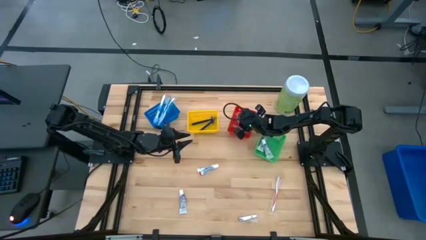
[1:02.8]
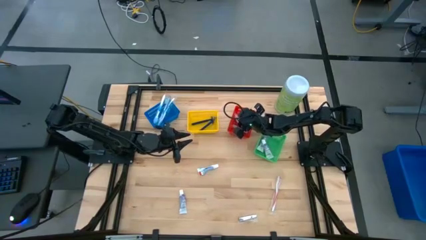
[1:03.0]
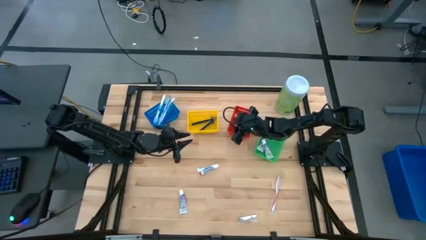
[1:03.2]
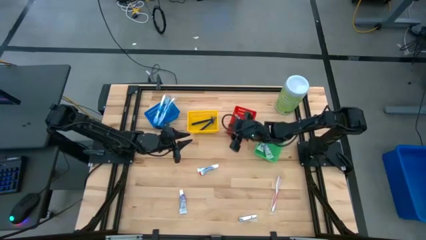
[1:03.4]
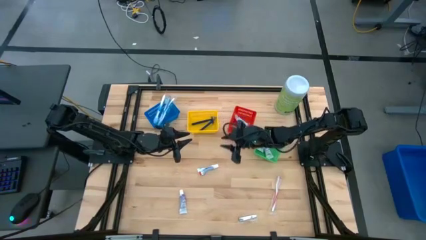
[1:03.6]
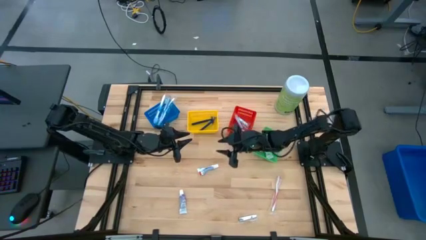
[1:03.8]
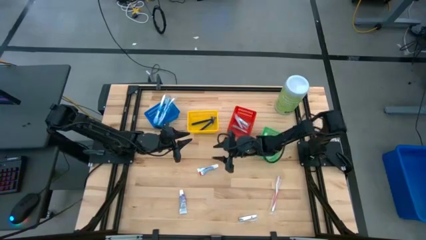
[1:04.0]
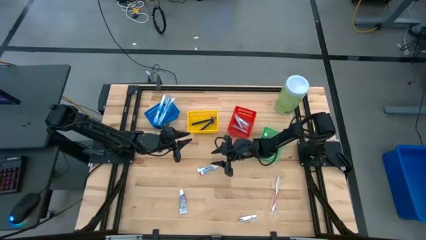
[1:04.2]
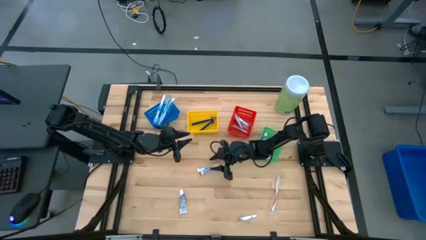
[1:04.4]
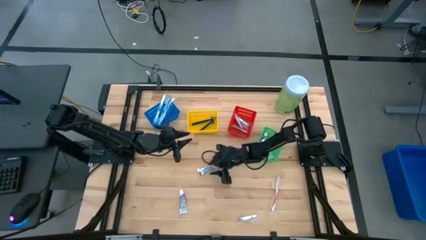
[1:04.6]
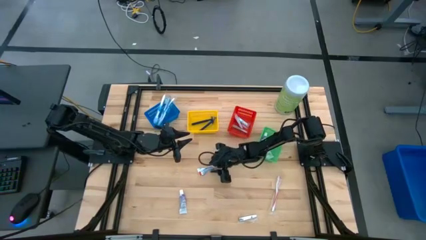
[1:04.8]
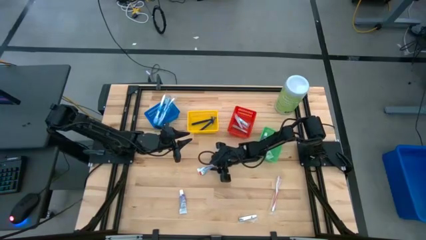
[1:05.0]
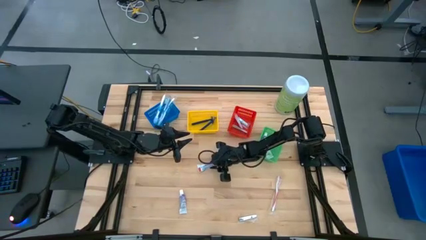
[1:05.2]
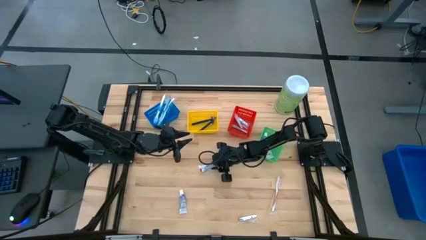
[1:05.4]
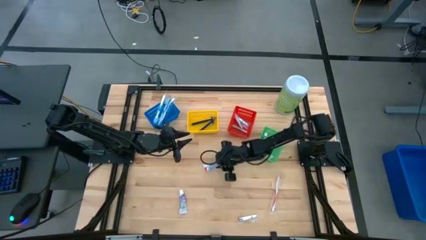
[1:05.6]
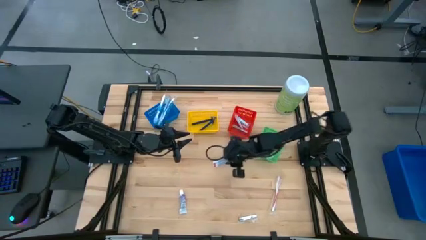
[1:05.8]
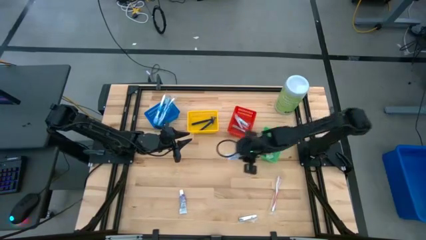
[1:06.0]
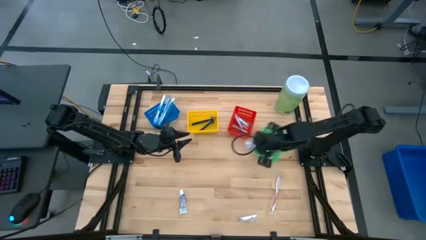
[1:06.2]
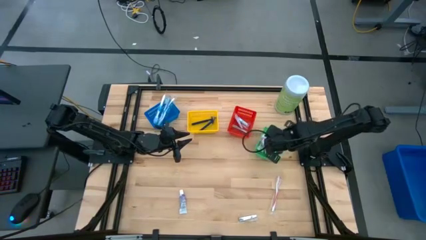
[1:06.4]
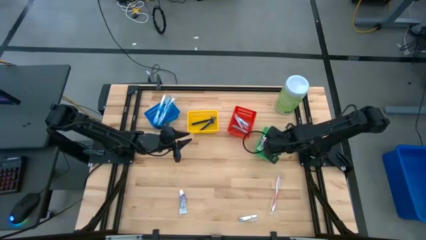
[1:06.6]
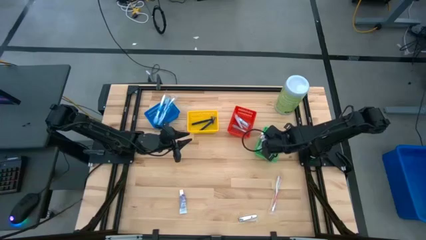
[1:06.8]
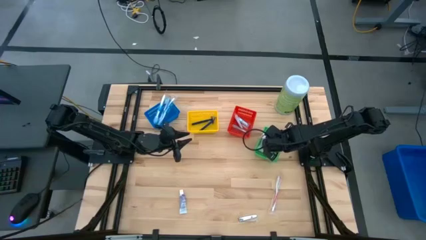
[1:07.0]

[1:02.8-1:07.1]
Task: Pick & Place Travel size toiletries
Put the white toothpaste into the green bin

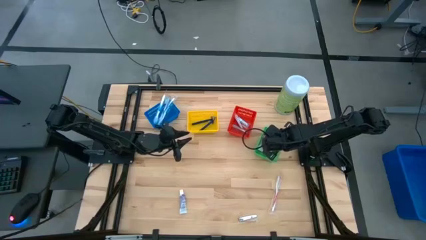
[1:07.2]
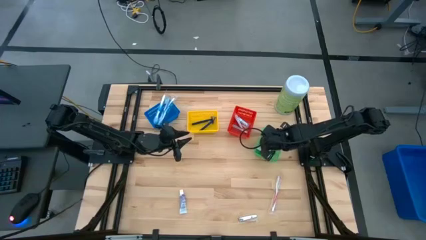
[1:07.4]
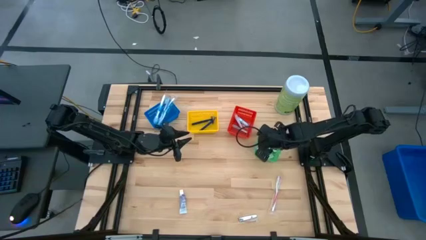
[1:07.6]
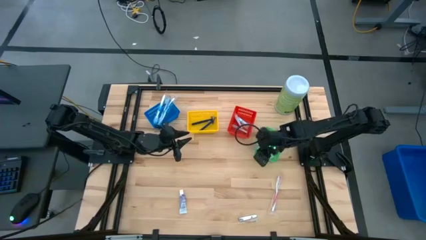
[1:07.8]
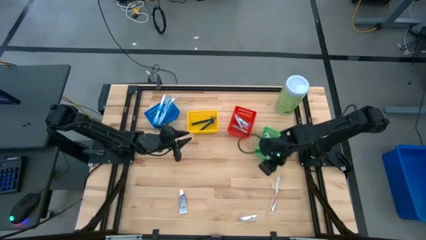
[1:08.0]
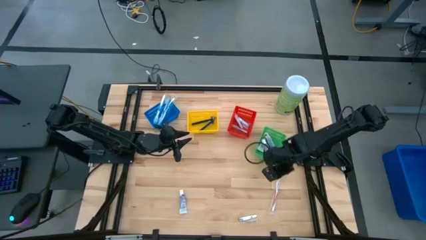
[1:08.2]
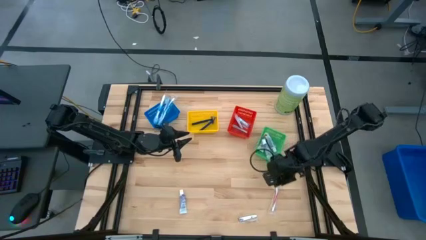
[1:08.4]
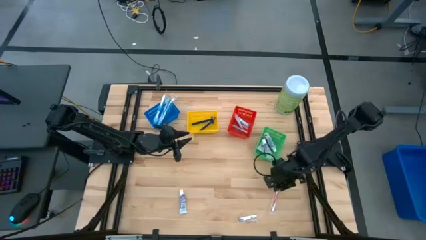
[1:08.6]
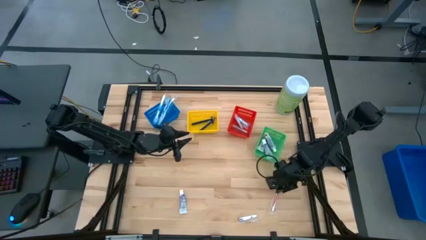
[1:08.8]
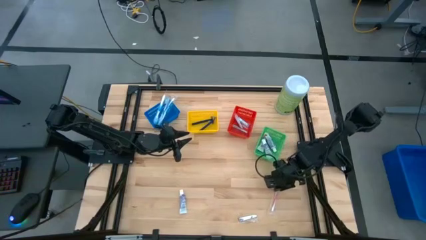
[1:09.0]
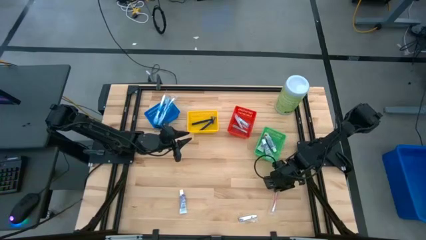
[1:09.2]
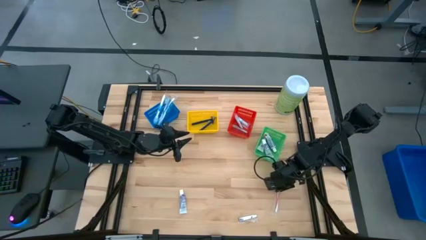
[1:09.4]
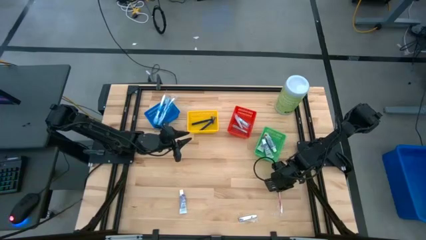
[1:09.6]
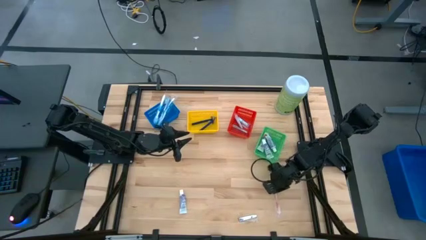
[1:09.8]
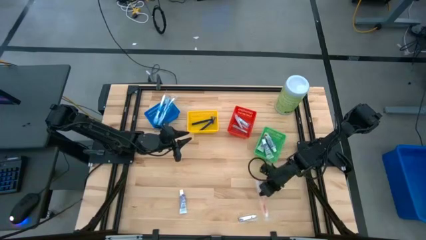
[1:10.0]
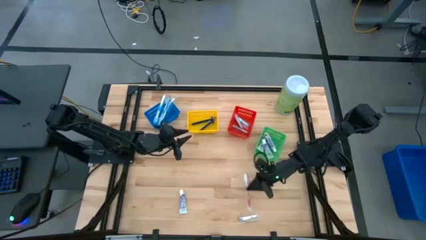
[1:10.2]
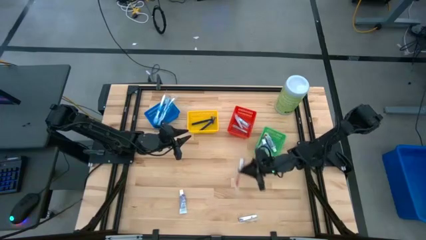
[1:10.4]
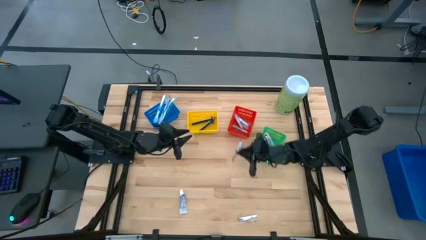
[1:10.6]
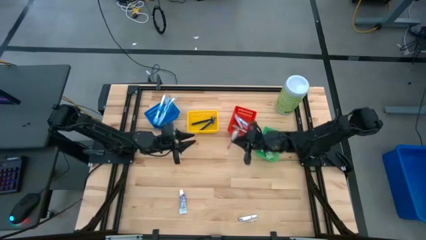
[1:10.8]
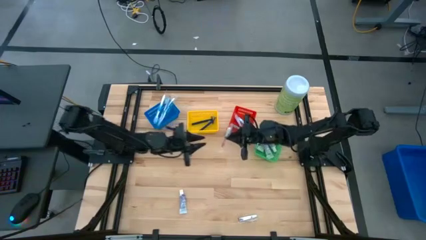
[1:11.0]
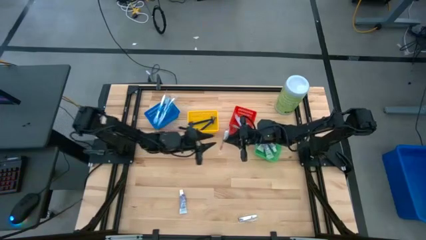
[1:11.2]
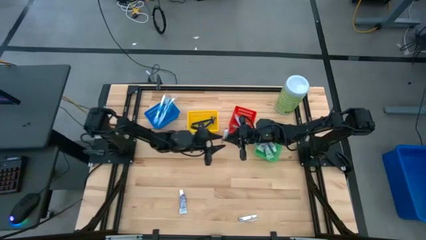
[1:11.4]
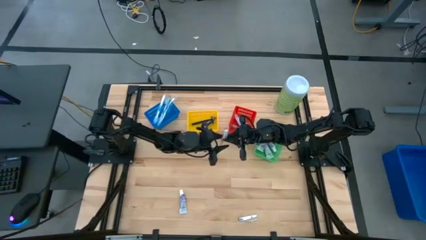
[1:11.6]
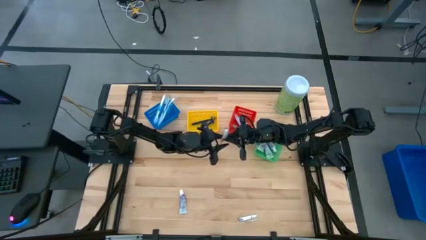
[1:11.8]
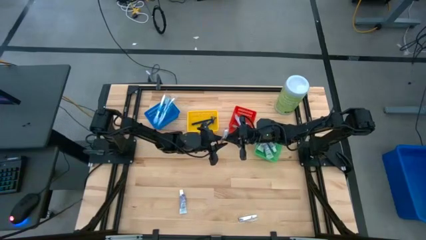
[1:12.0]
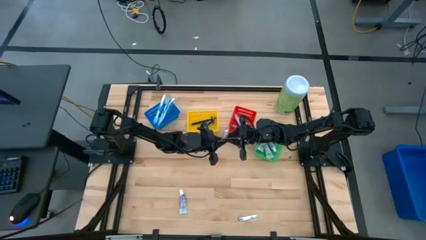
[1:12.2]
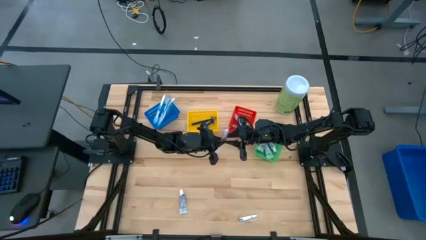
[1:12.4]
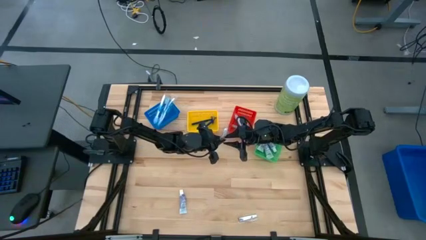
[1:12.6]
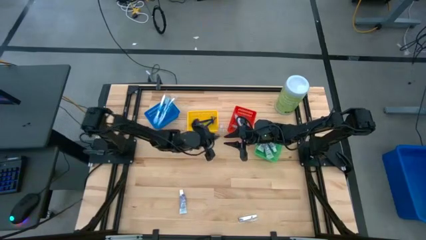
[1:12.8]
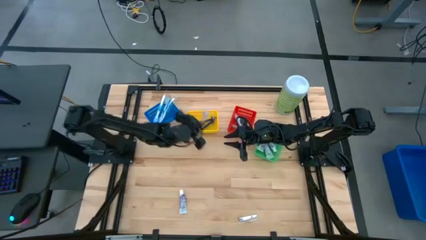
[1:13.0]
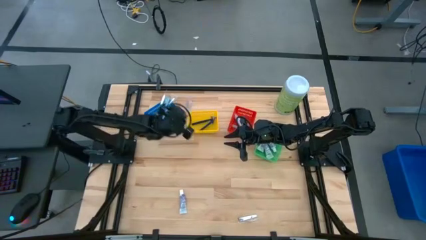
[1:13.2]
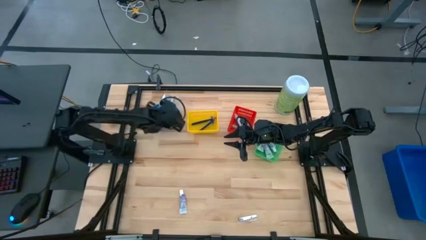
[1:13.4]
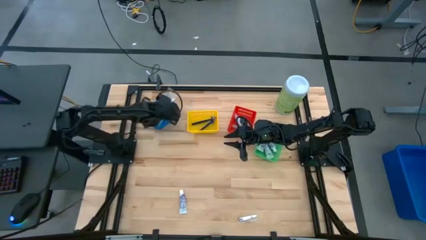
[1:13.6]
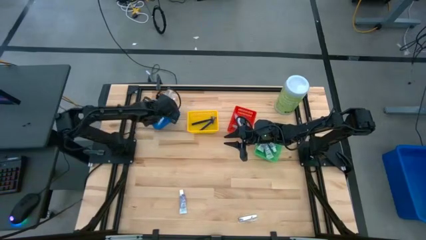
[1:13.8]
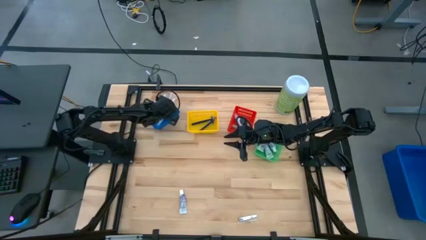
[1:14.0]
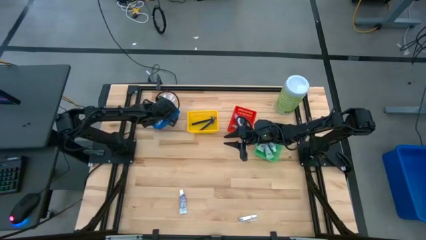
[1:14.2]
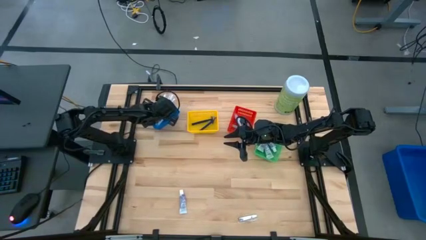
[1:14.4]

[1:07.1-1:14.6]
Put the red toothbrush into the blue bin

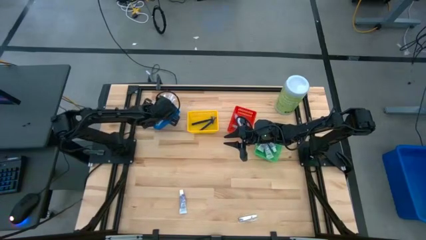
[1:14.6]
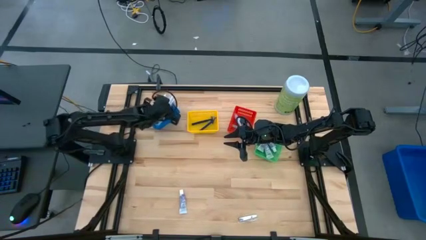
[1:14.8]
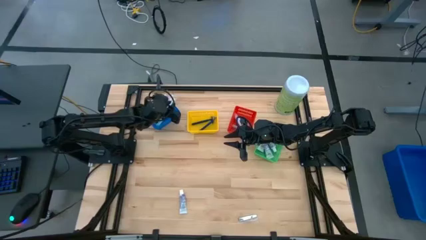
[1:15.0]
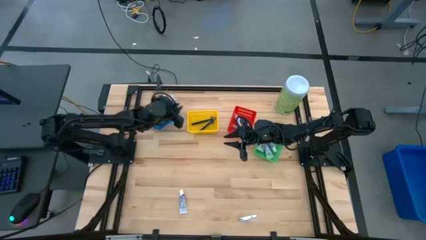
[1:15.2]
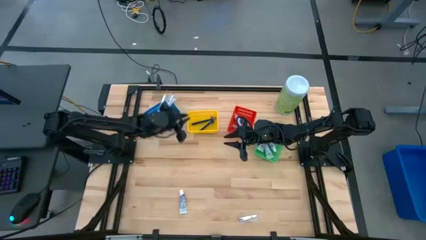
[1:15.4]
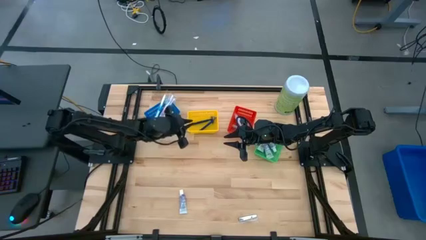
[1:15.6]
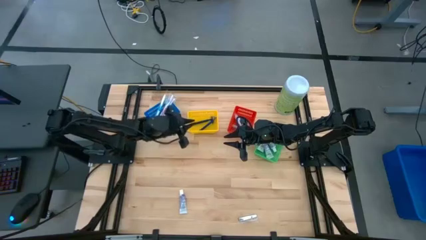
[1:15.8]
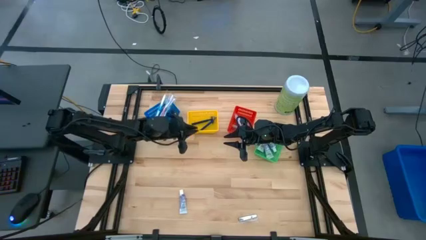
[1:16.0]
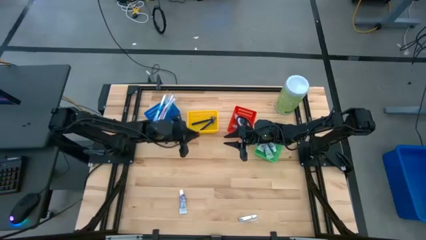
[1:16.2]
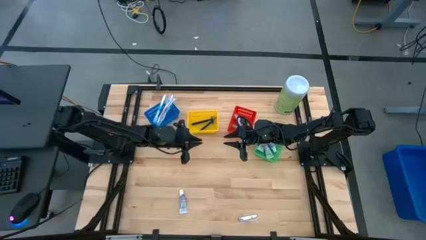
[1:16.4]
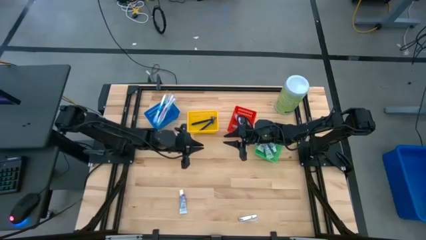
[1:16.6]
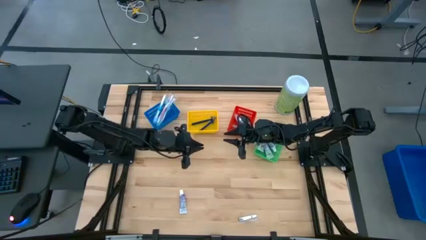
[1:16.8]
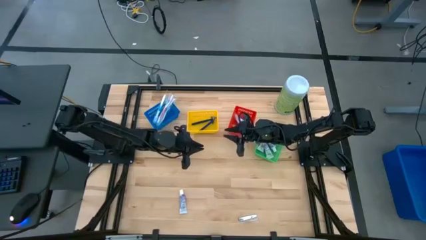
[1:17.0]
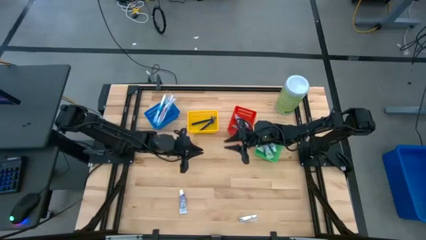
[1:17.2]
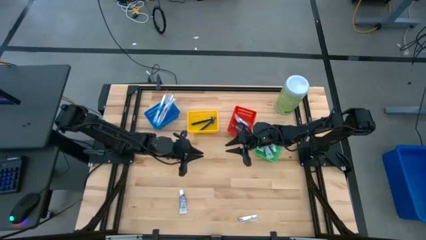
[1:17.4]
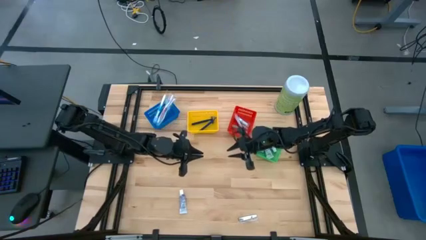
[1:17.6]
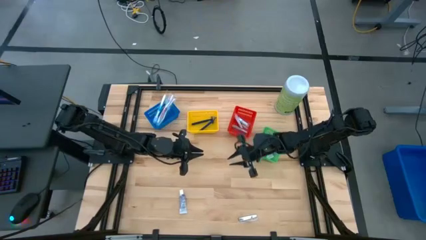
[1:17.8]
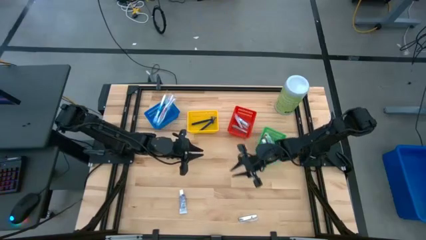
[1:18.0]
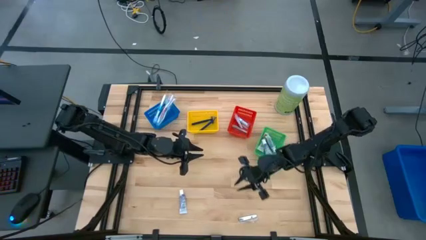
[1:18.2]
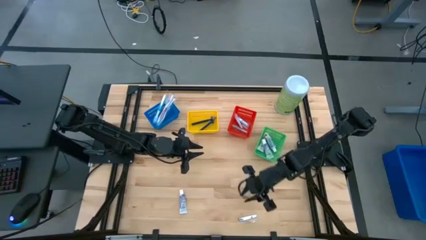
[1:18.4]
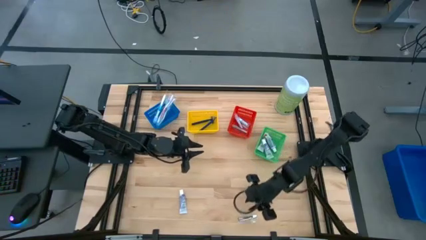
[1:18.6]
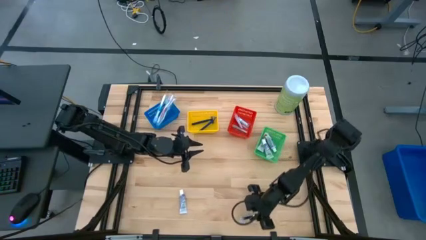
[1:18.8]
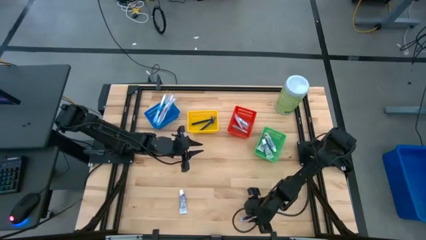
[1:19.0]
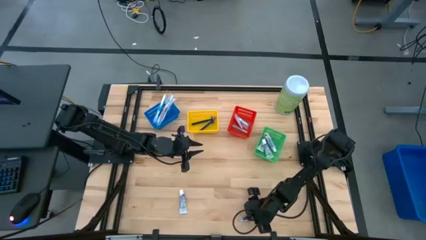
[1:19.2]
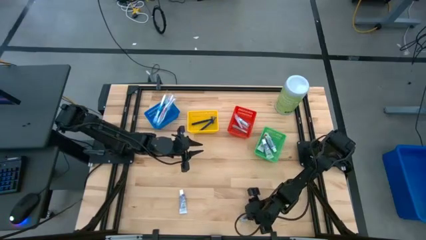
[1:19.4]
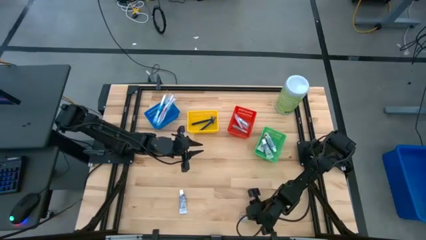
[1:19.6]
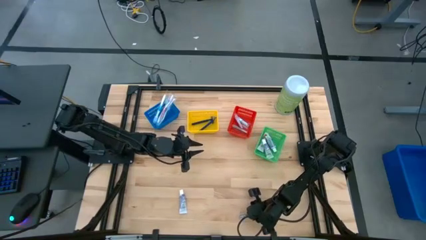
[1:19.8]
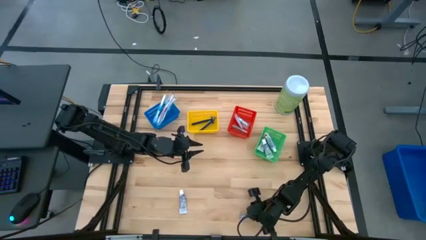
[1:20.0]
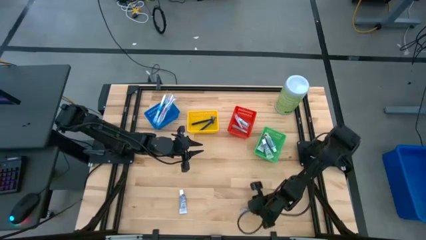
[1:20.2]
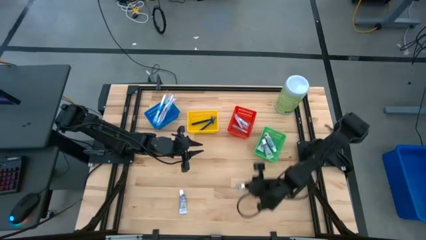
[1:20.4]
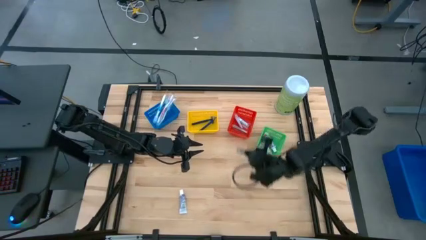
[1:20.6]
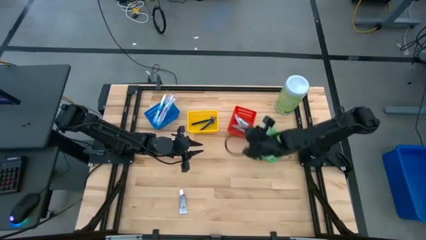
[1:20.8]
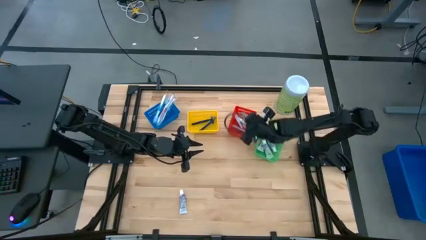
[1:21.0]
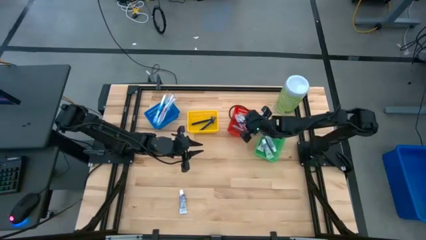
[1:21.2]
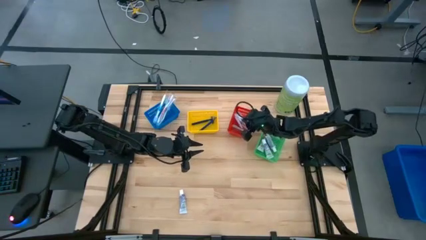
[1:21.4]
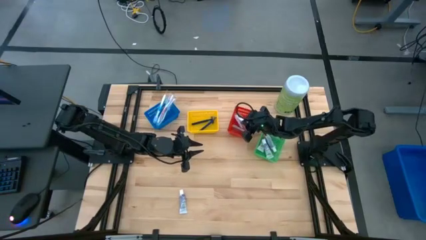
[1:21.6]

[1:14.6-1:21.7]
Put the silver nail cutter into the red bin
